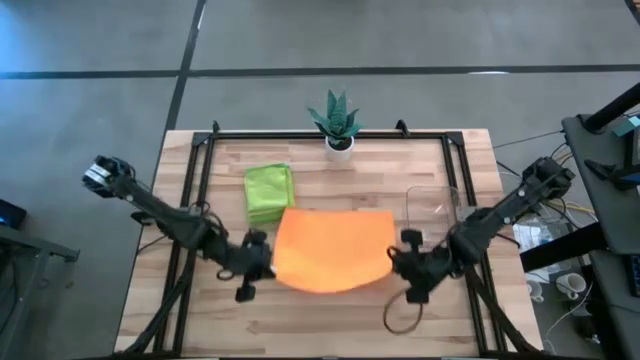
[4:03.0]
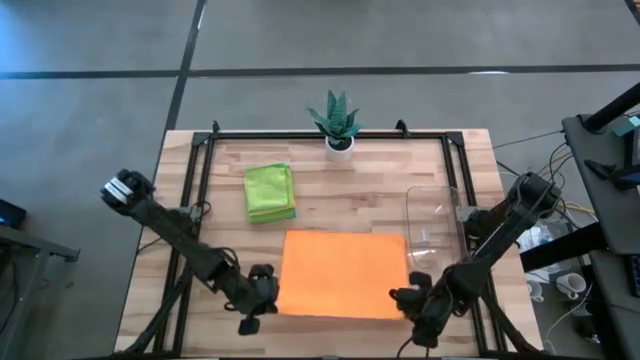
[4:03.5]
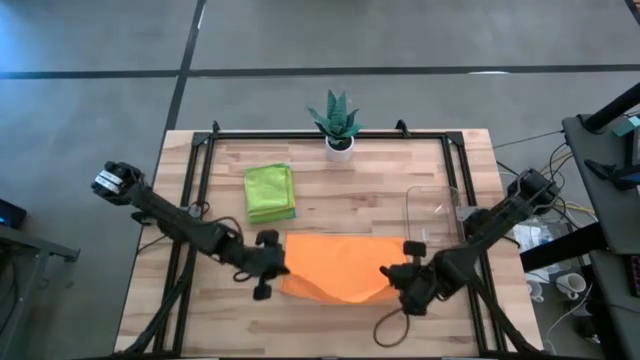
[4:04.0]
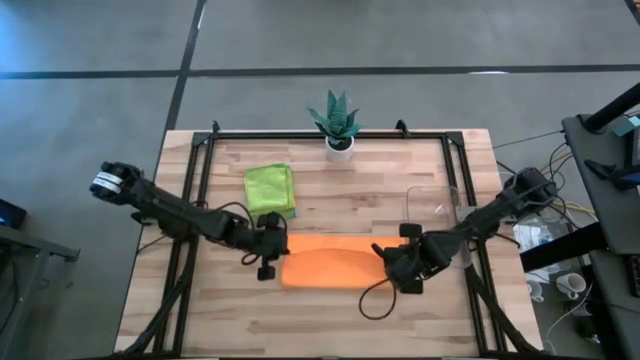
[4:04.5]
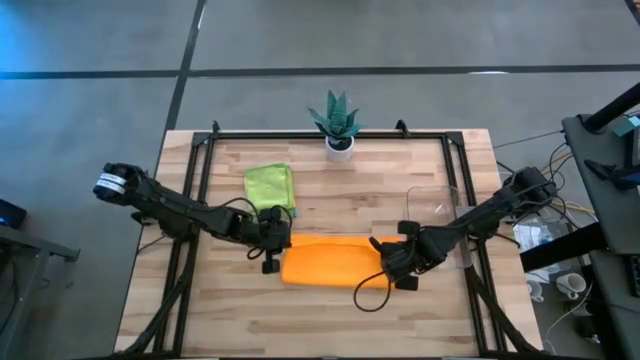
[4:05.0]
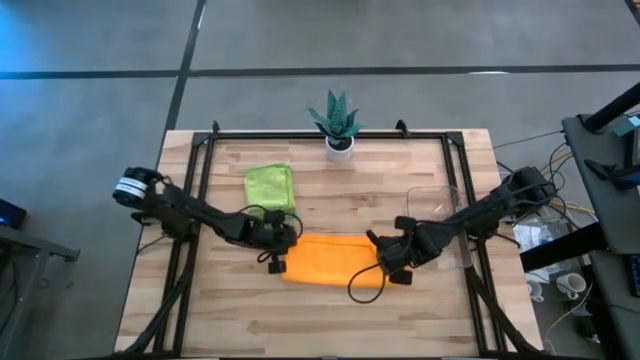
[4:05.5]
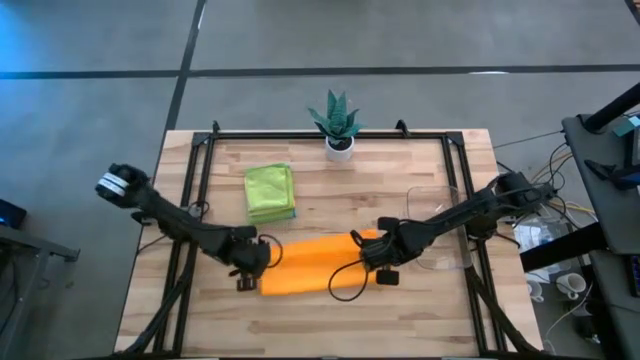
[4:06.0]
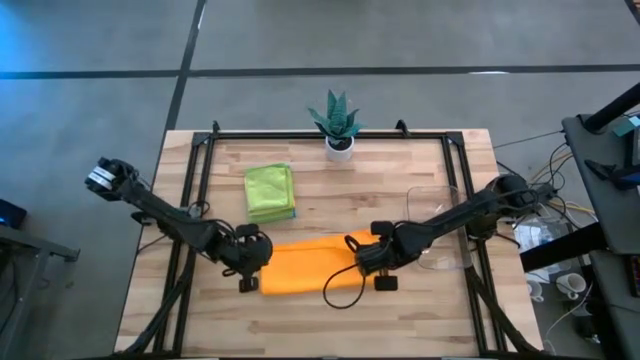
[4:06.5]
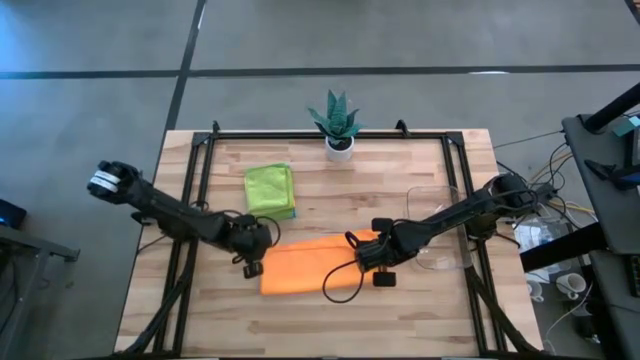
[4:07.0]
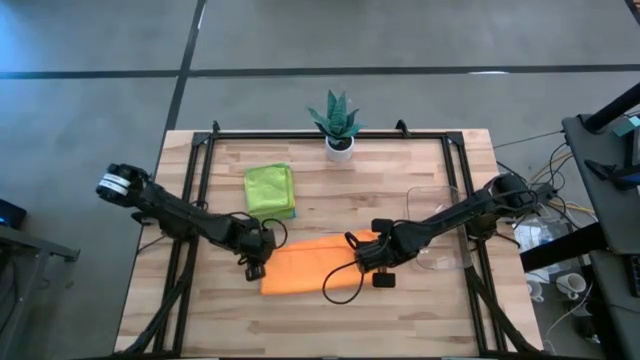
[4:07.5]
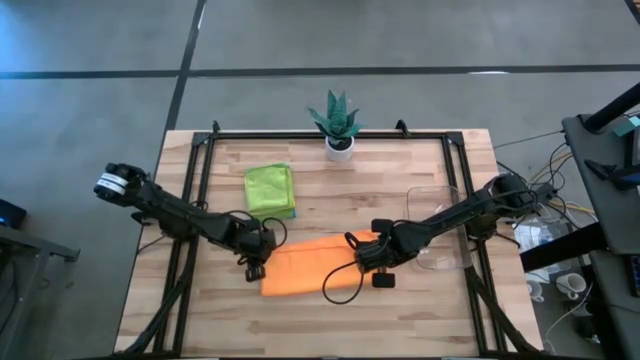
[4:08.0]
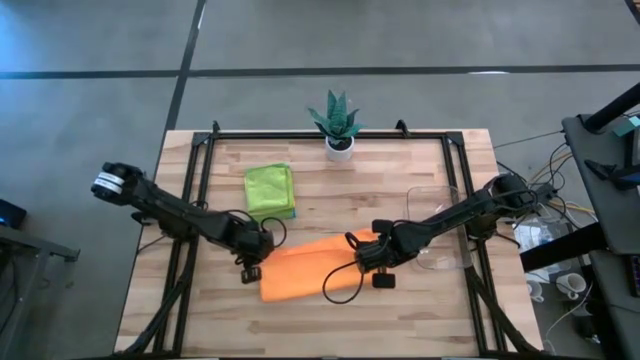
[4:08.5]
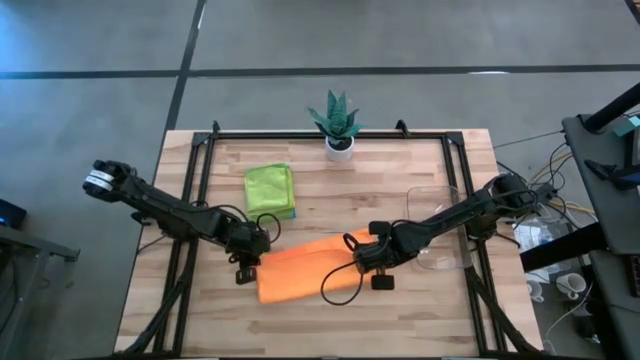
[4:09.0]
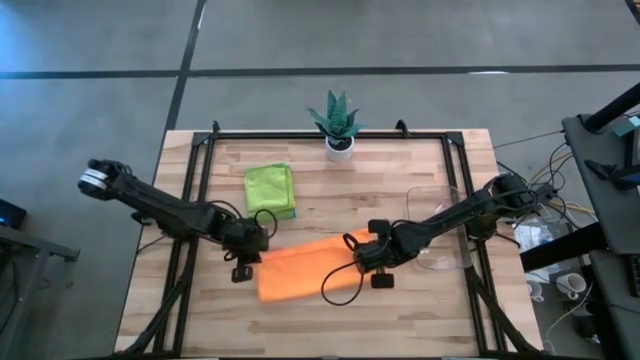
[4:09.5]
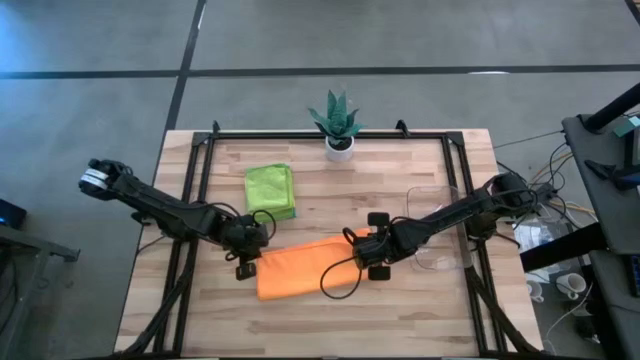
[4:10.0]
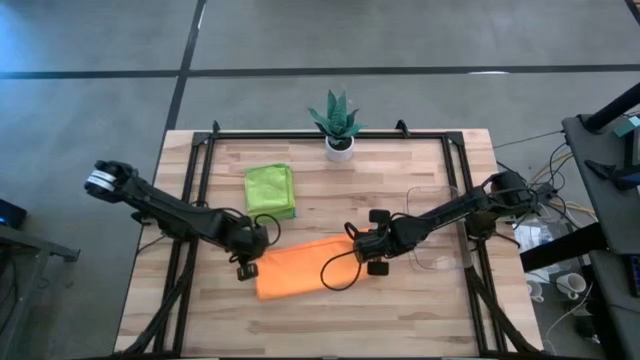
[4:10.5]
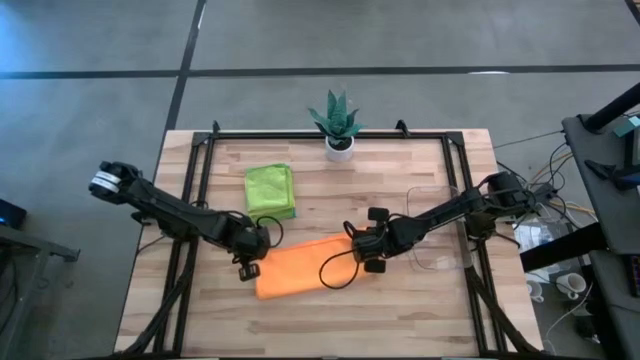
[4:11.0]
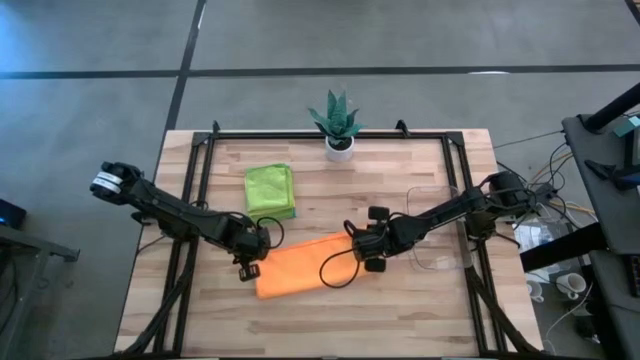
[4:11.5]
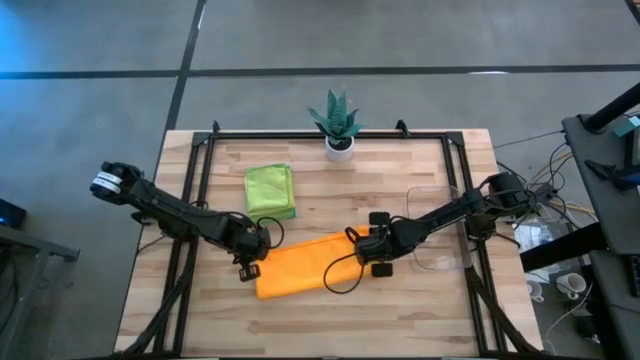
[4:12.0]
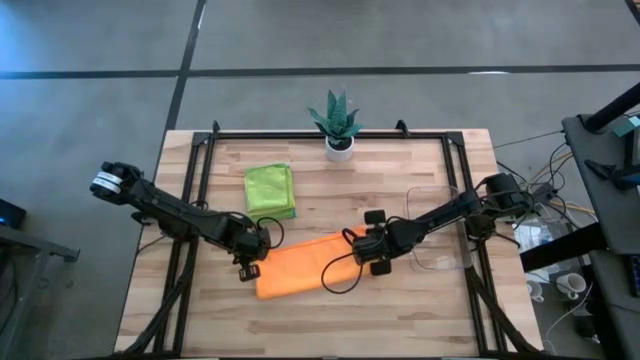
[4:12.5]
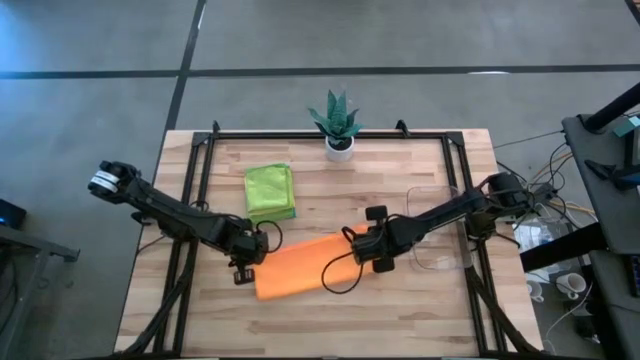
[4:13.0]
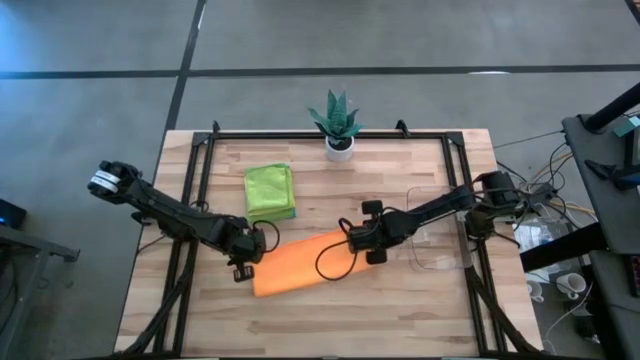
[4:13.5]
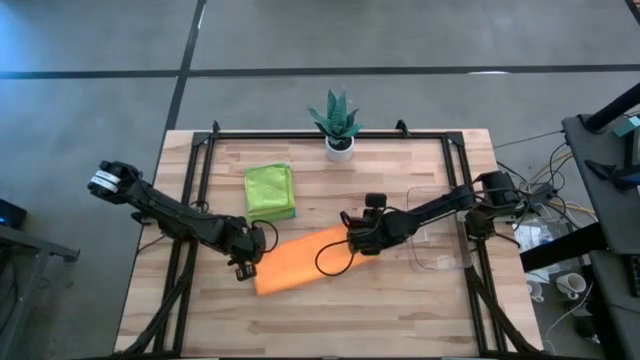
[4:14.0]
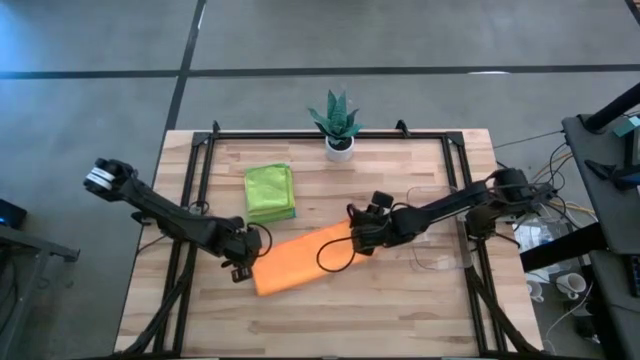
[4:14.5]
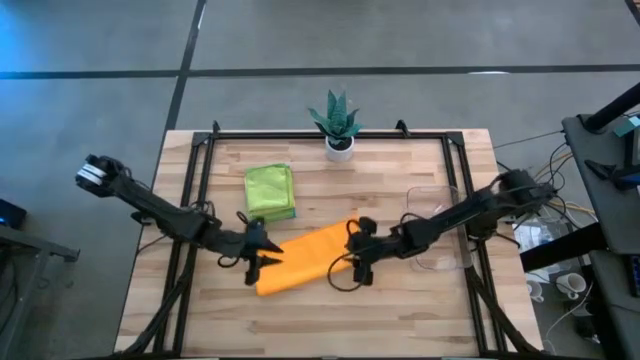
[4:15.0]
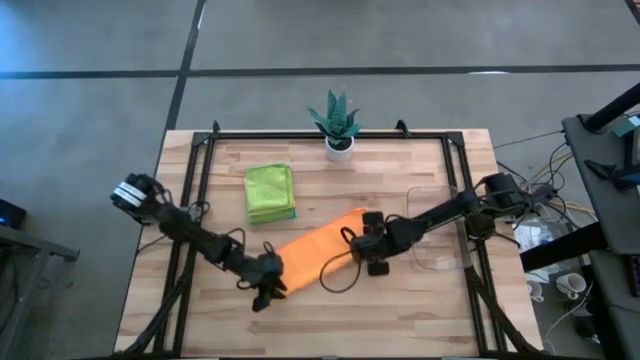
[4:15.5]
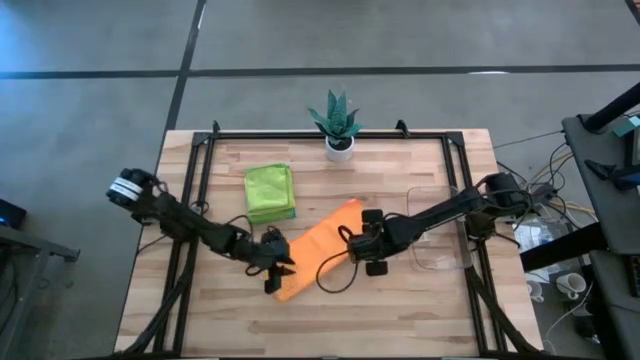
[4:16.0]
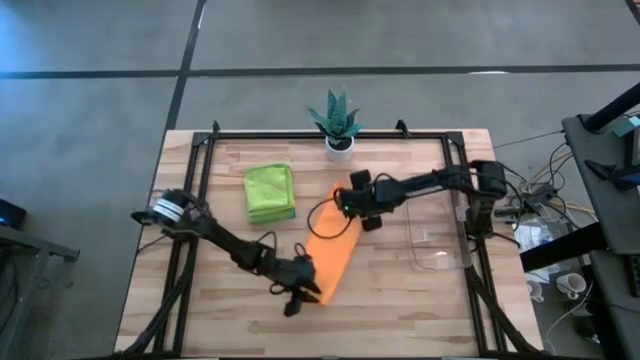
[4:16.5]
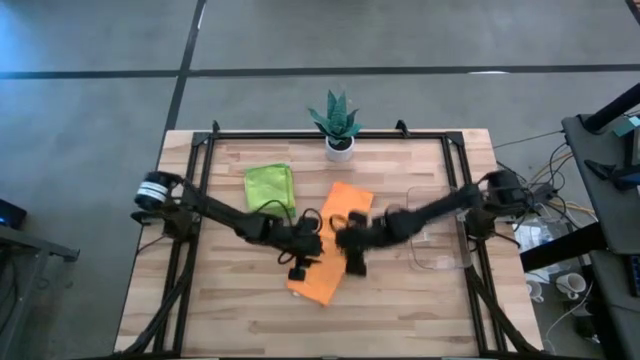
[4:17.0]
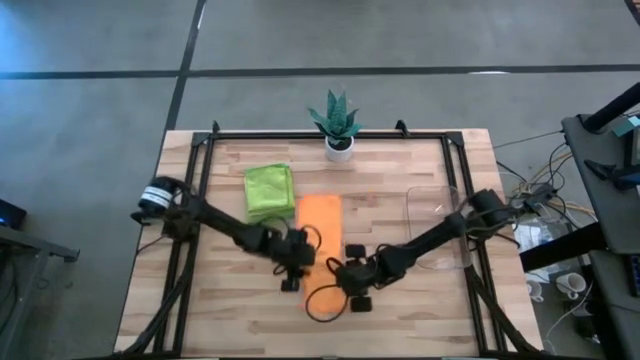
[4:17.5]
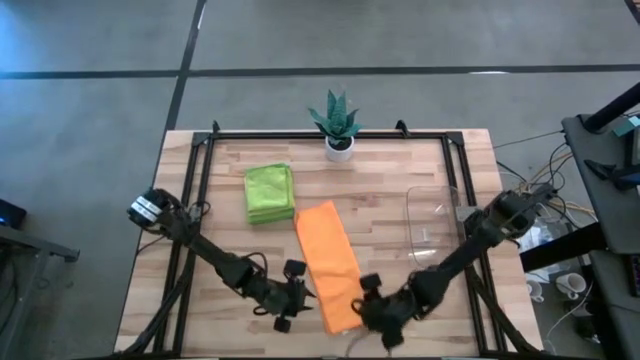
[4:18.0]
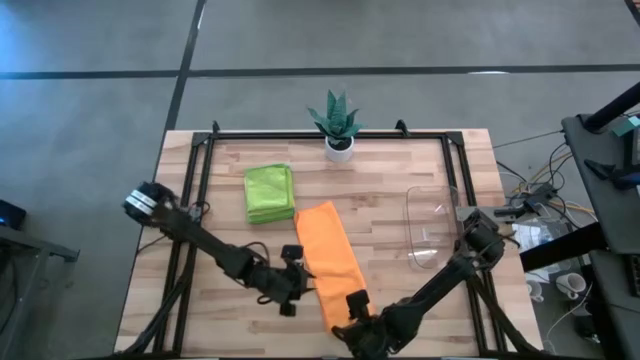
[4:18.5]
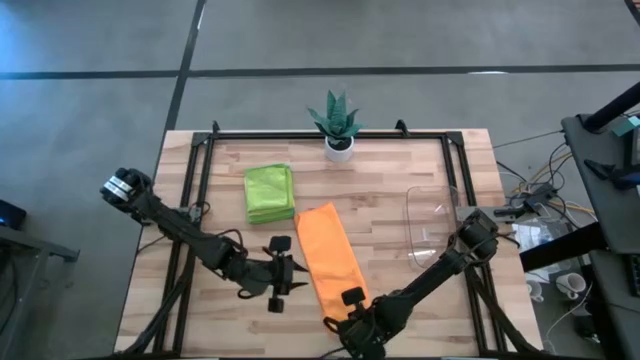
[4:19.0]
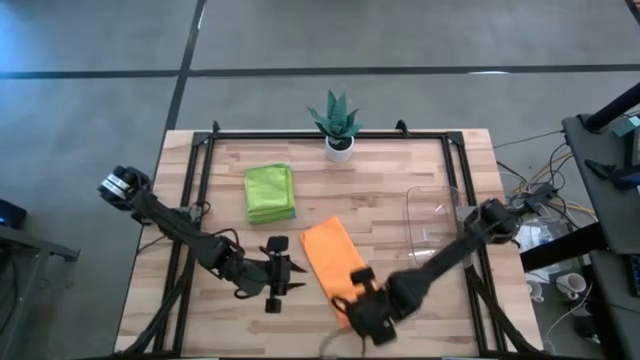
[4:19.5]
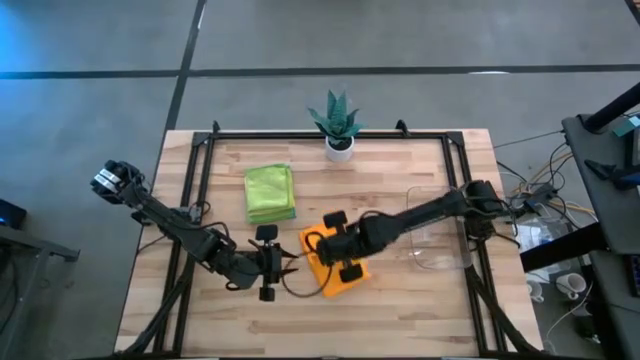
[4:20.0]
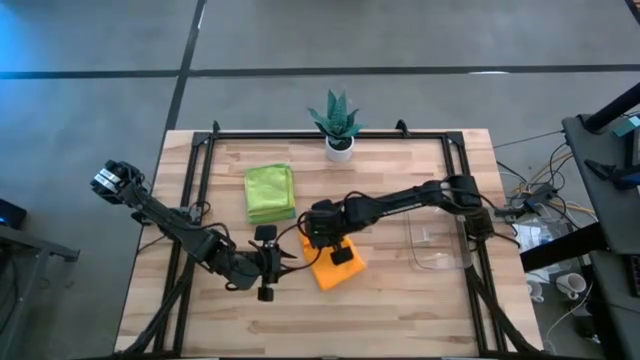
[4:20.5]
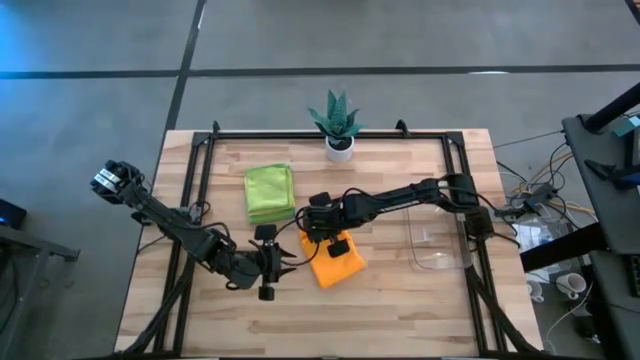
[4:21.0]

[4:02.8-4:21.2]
Task: Fold microfiber towels
Fold the orange towel on the table

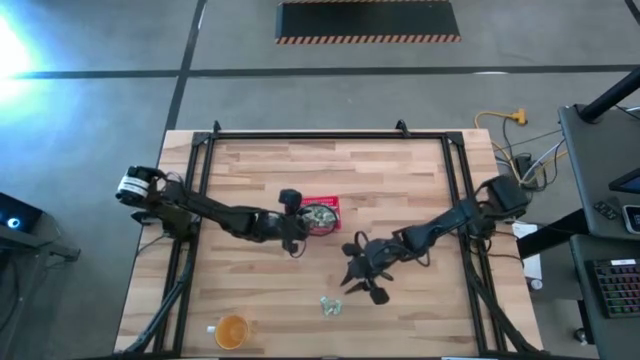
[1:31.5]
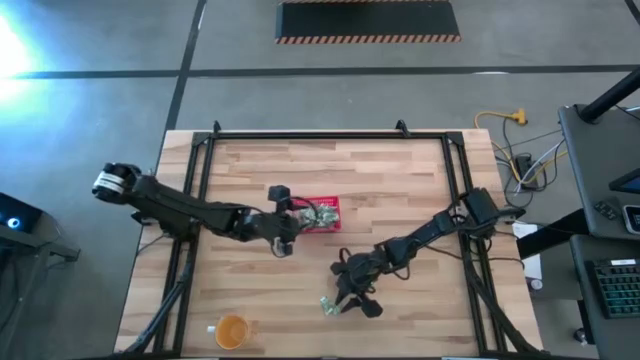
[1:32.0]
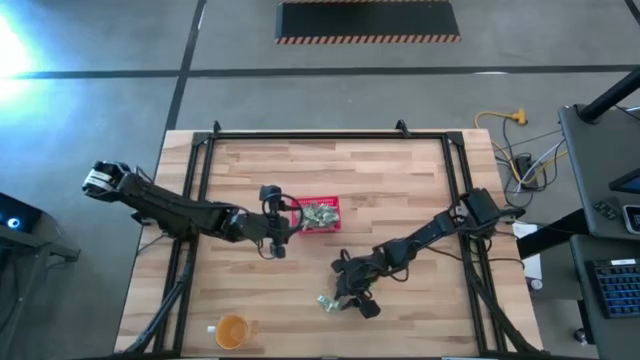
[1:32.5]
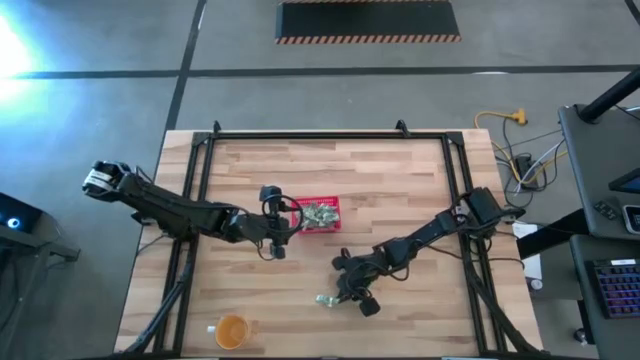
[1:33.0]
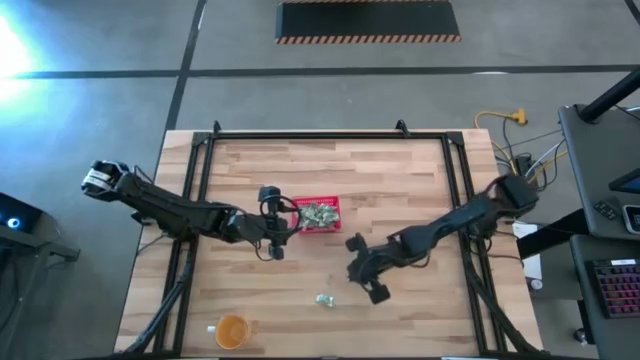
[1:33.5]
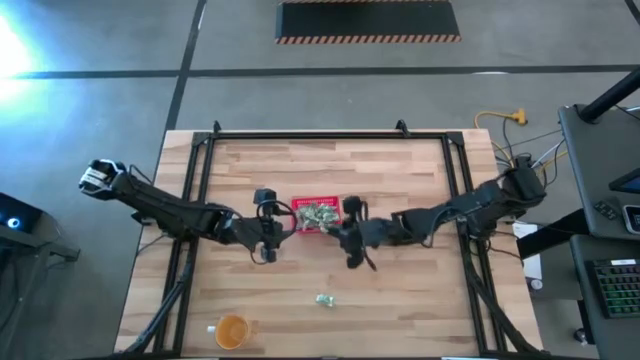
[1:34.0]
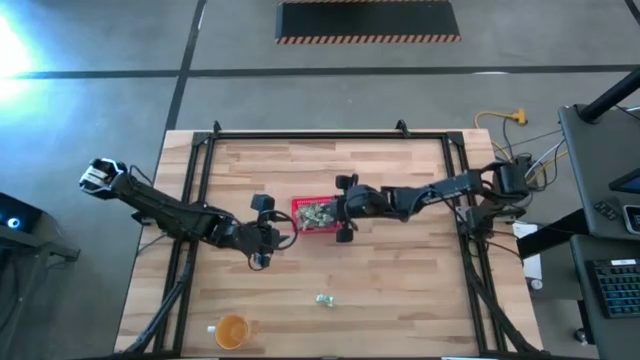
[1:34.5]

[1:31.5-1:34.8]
Task: Pick and place items into bin
Put the stevia packet into the red bin
